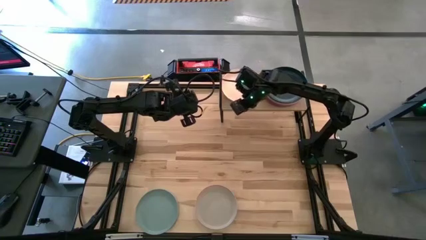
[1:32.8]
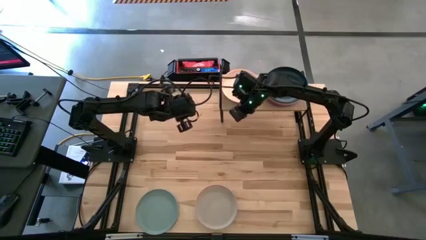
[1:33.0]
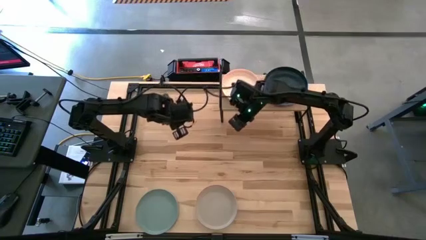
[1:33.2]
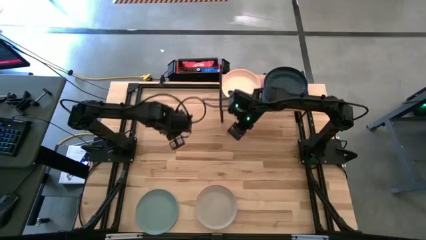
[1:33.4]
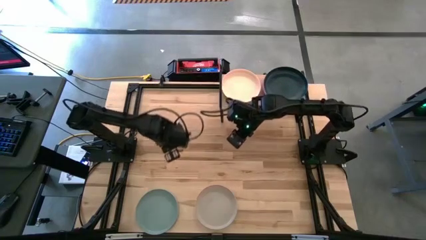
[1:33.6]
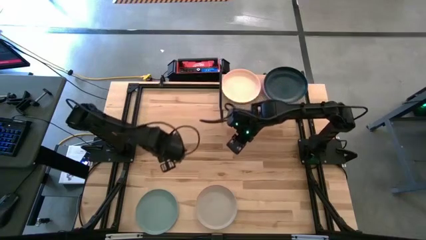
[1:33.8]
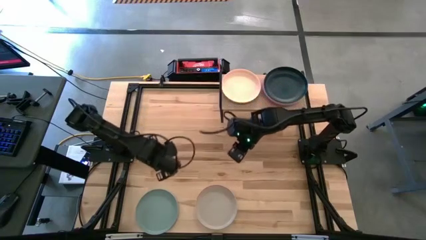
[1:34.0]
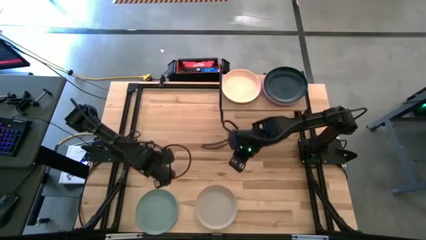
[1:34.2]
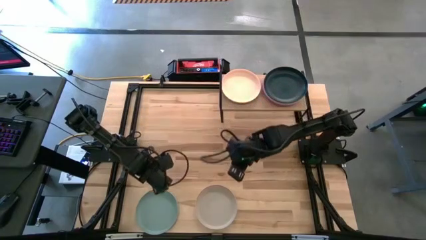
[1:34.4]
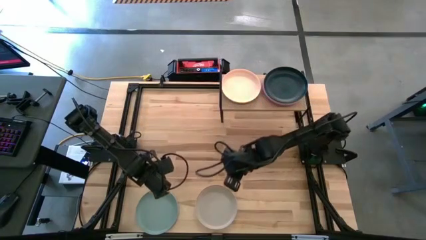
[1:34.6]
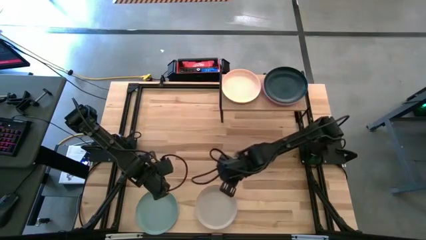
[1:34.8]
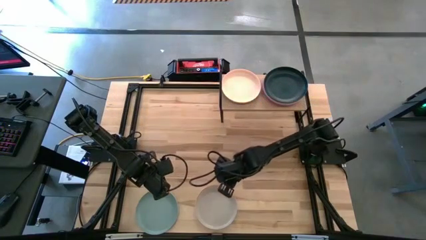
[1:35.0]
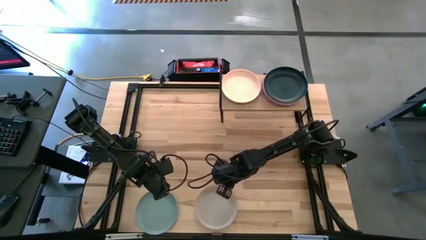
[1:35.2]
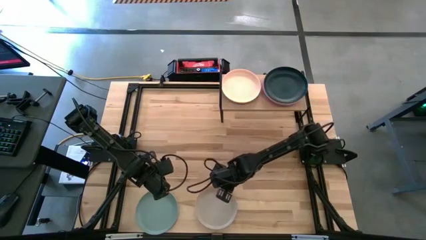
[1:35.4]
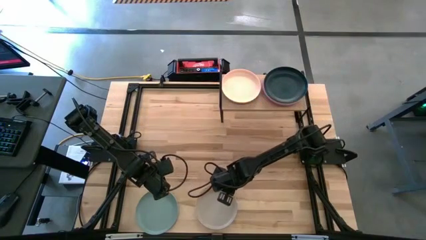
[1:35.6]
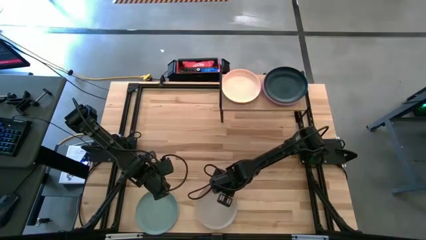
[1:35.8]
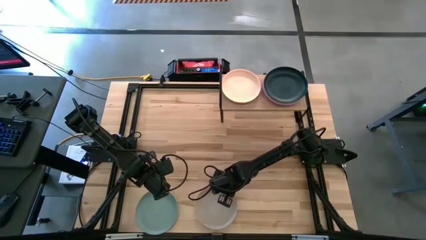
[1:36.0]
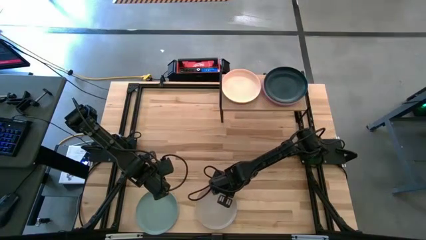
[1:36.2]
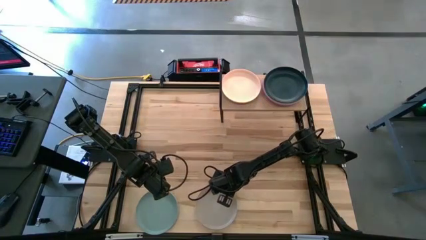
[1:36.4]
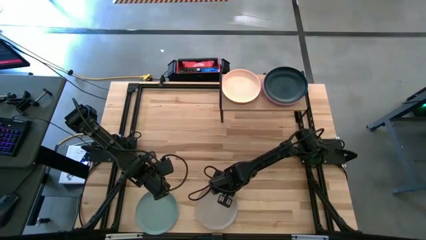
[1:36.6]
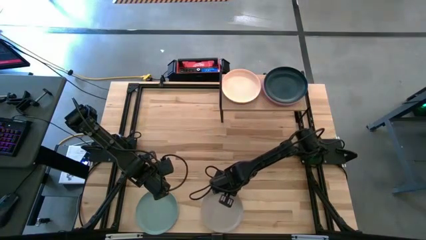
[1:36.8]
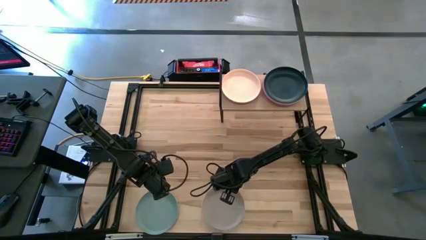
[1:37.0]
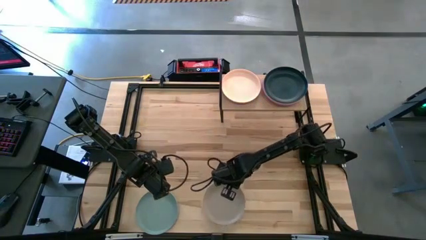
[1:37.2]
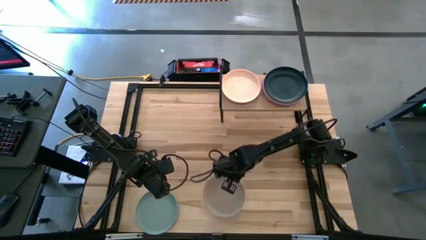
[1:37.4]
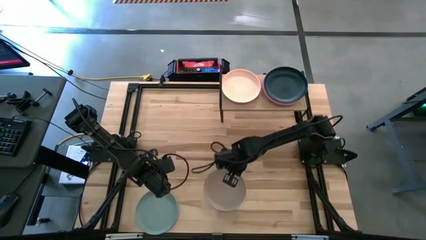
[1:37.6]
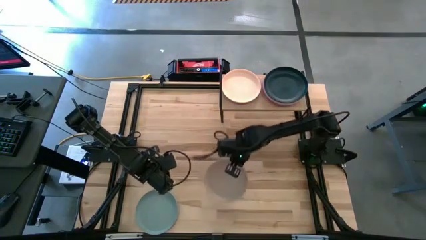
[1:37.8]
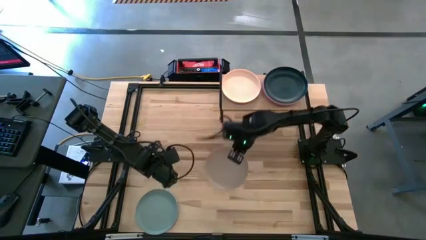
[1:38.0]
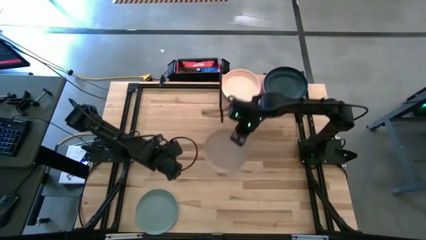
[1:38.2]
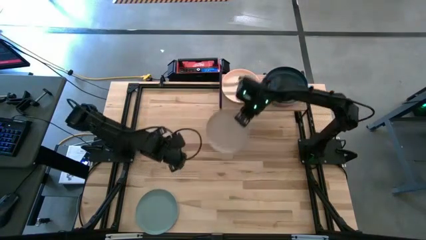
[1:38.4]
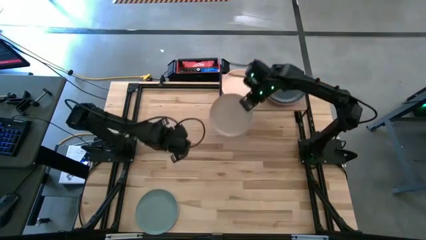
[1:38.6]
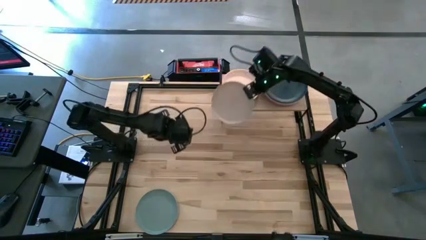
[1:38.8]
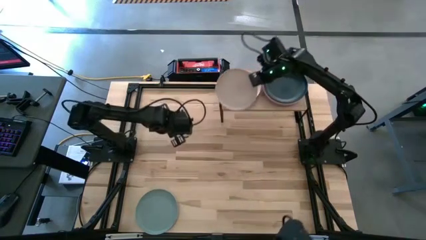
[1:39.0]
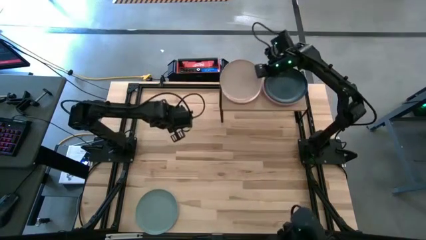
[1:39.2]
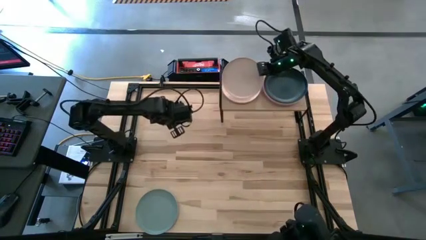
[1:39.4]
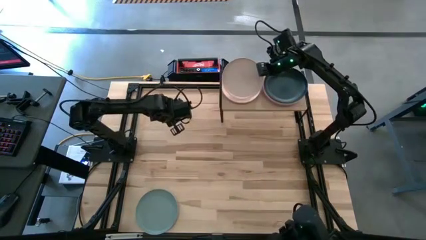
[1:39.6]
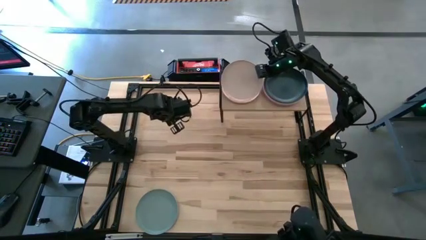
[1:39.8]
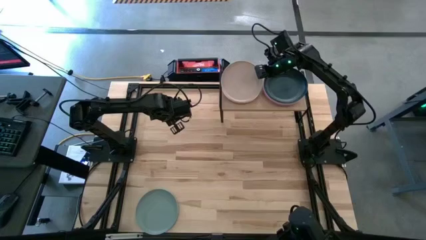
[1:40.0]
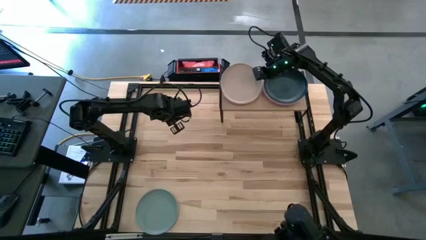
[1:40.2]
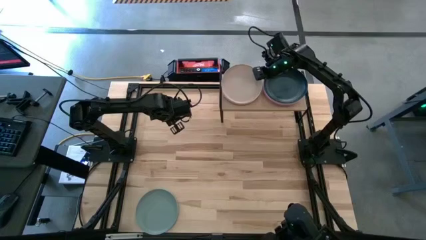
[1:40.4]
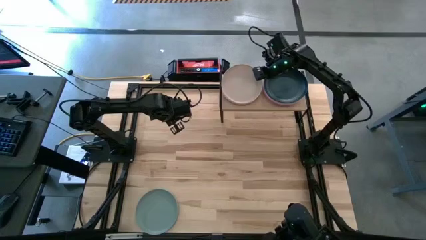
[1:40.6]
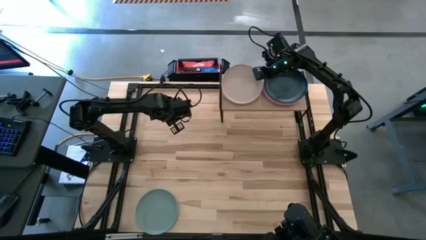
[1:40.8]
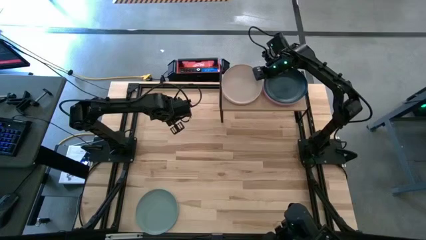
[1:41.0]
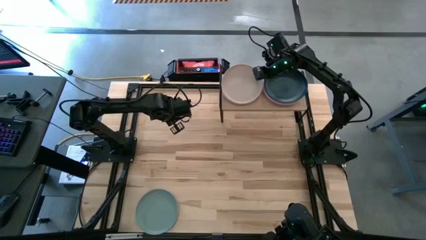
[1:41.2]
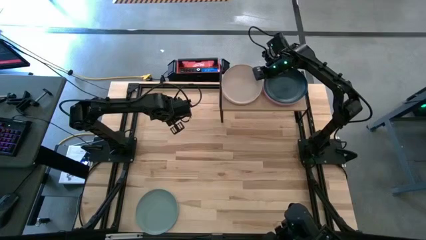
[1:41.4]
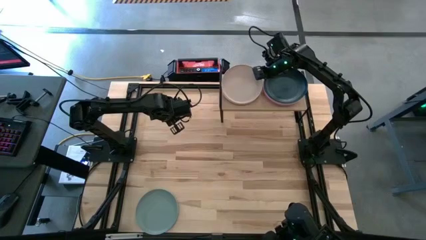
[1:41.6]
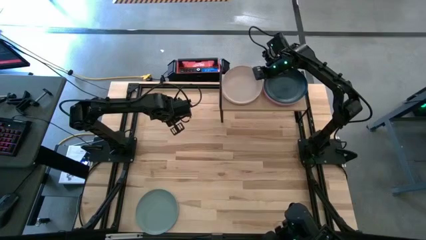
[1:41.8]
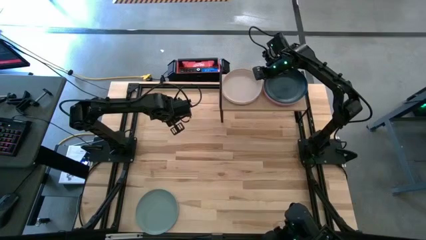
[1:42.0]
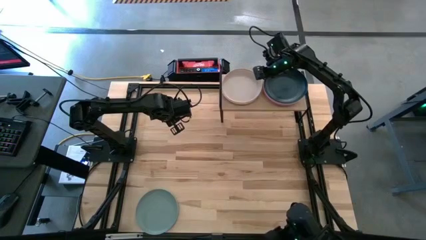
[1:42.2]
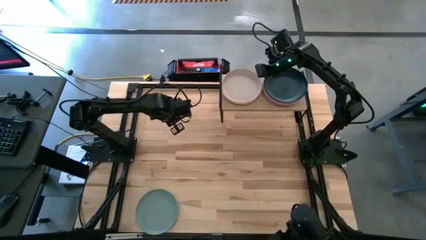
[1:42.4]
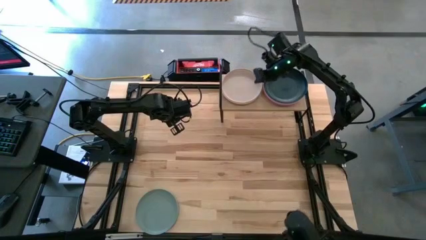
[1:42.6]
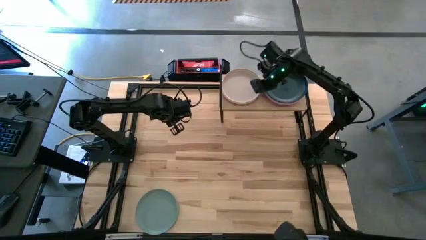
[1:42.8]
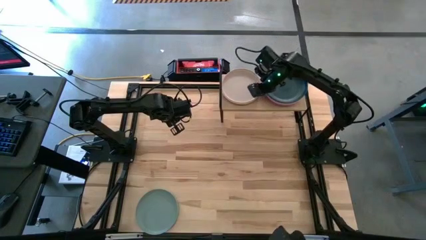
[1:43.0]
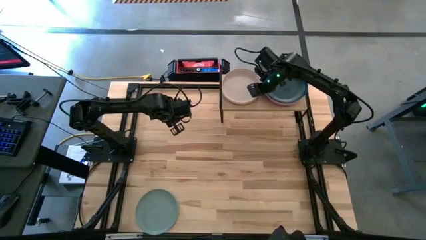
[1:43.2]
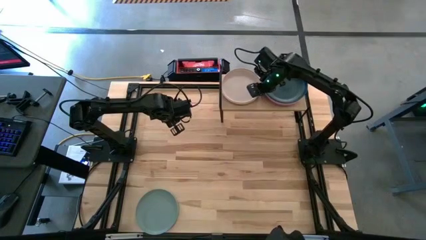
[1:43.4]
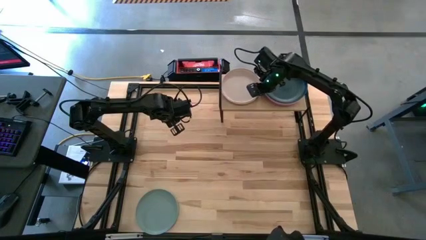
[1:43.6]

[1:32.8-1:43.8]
Task: Place and stack plates onto a shelf
Stack the gray plate on top of the light pink plate on the shelf

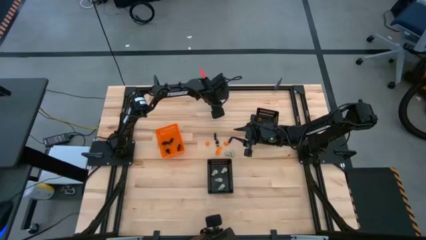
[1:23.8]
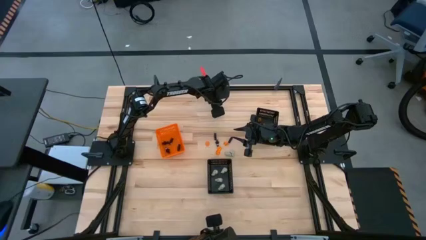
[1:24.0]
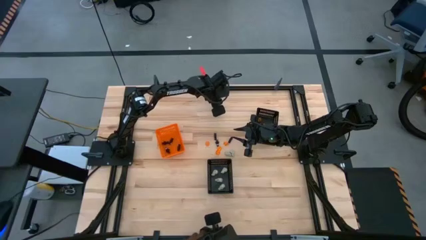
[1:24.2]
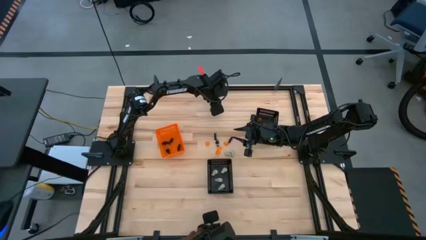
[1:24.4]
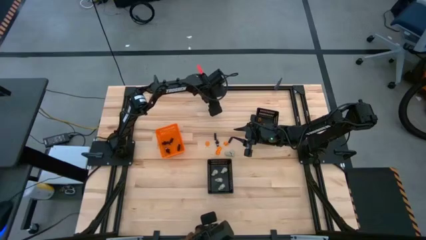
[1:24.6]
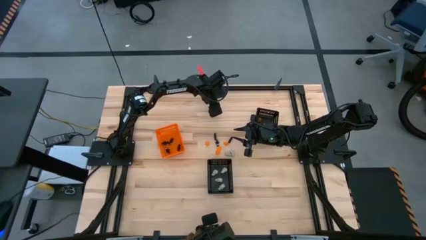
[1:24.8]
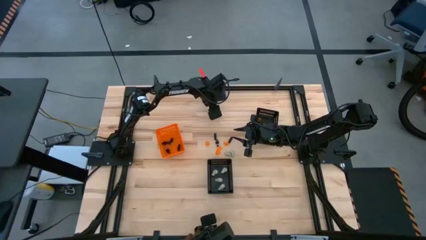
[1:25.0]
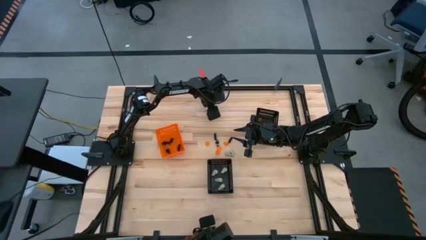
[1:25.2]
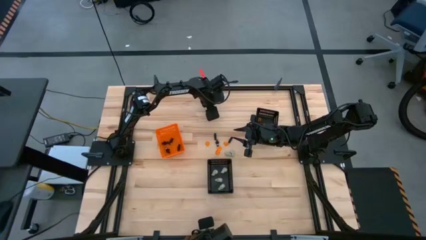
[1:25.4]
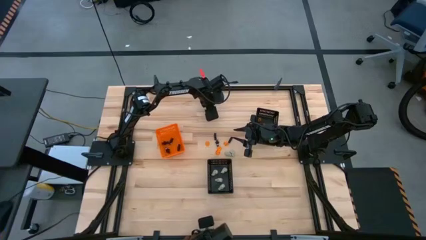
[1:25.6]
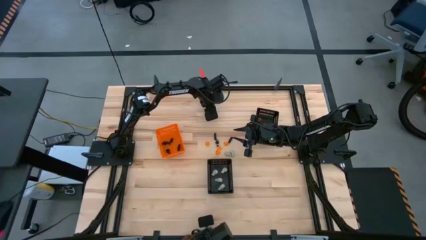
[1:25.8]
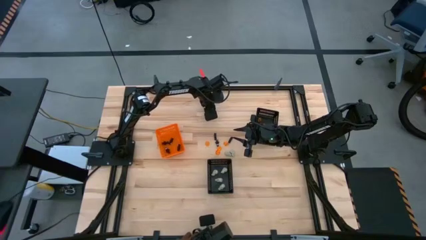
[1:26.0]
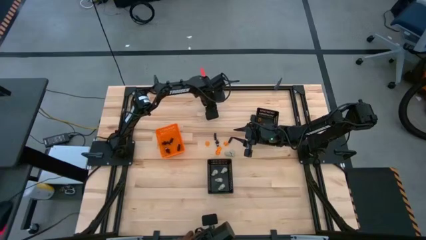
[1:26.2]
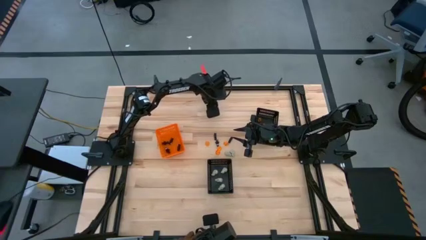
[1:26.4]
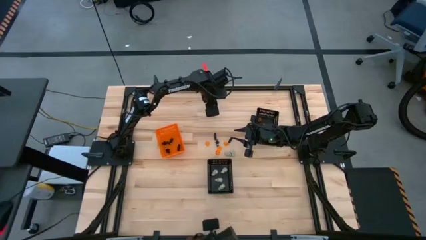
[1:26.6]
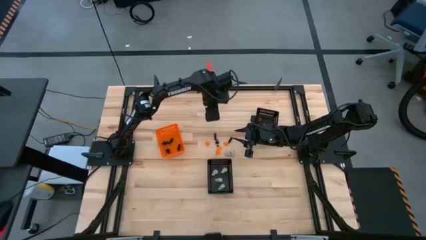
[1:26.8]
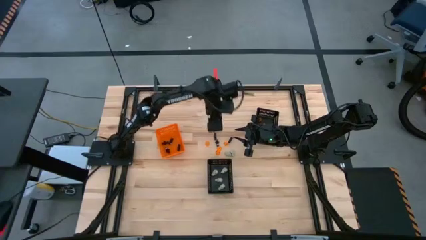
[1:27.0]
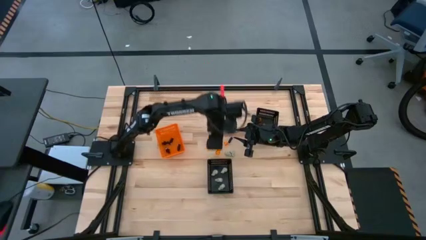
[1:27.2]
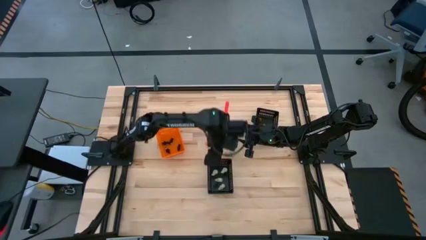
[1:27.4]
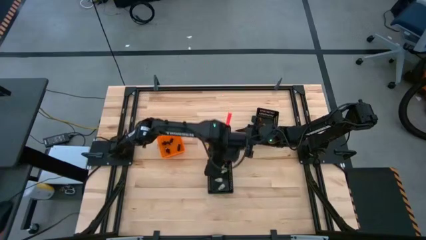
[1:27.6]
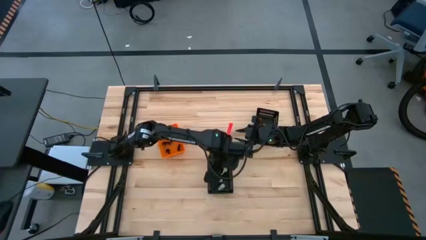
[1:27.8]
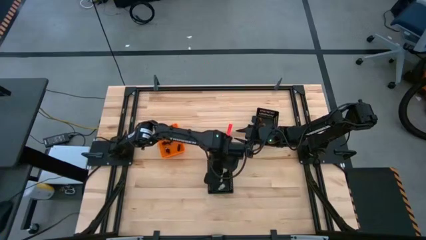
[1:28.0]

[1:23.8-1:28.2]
Task: Sort Halloween decoration
Put the white skull toy into the bottom black bin

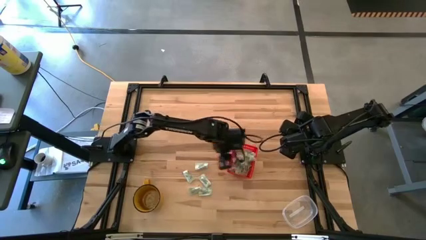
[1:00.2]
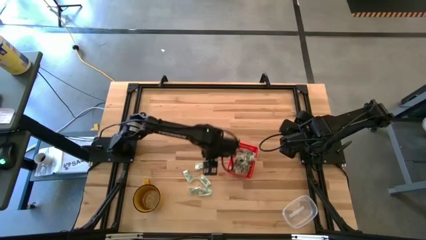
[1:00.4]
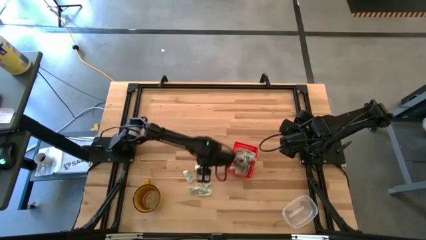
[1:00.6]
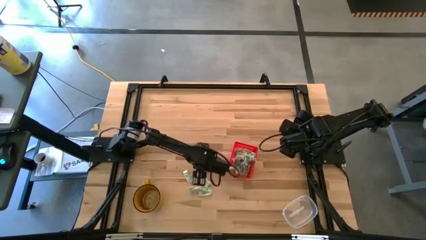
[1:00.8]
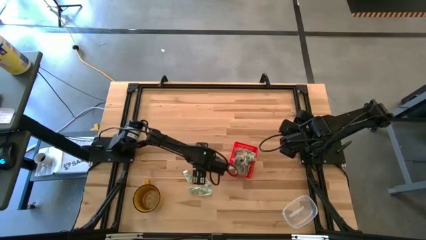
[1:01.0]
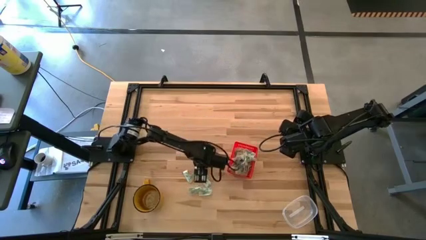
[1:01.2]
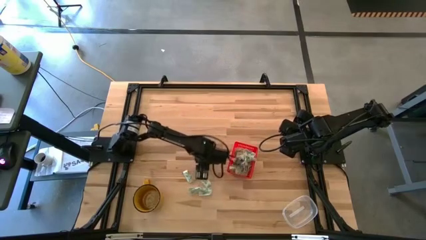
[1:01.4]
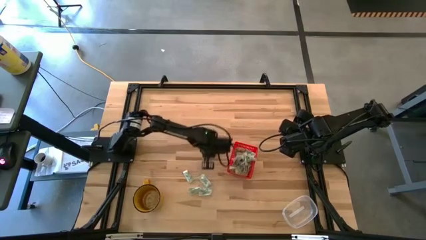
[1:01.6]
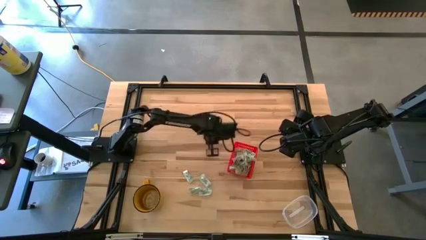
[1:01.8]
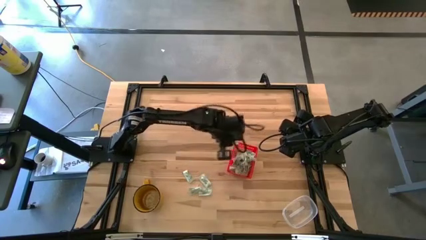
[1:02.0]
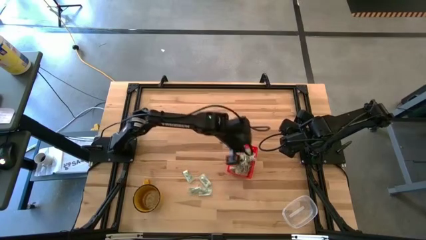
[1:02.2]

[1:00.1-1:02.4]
Task: Pick and place items into bin
Put the light green stevia packet into the red bin
